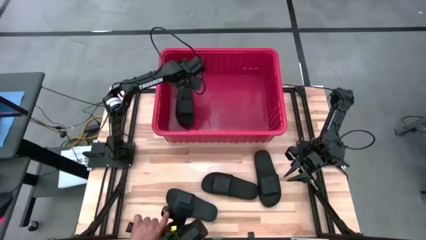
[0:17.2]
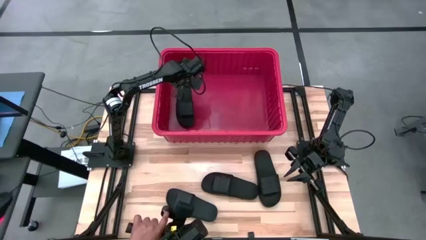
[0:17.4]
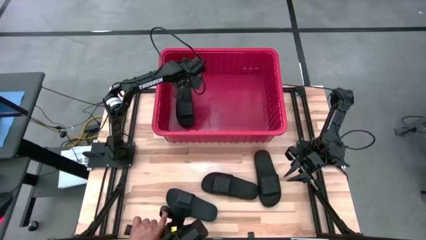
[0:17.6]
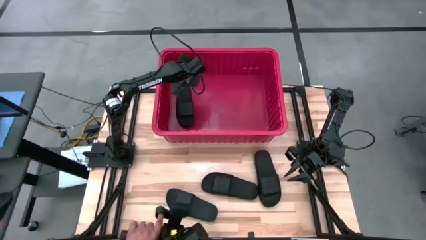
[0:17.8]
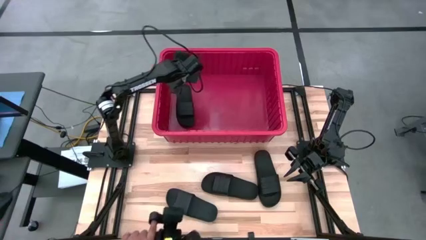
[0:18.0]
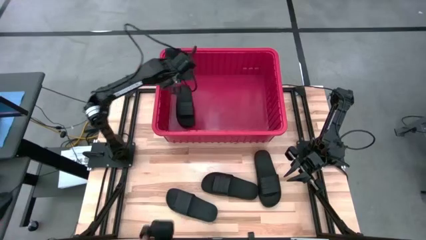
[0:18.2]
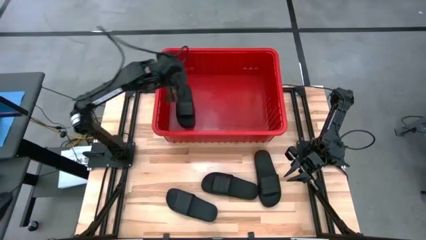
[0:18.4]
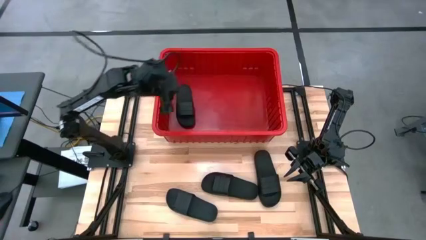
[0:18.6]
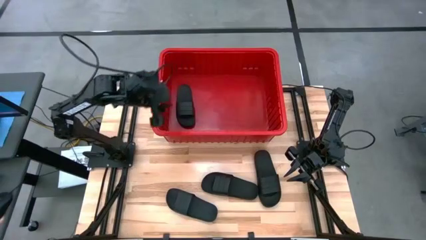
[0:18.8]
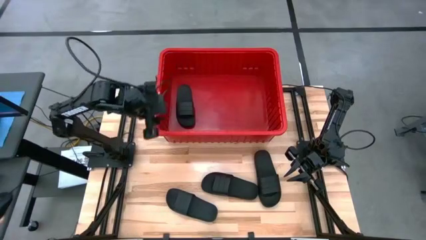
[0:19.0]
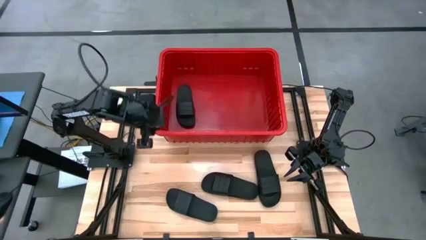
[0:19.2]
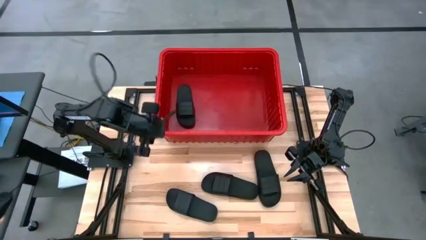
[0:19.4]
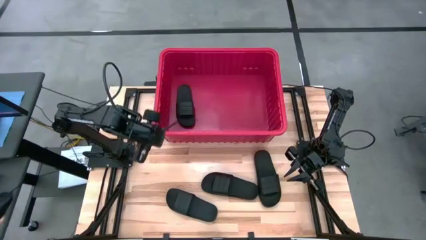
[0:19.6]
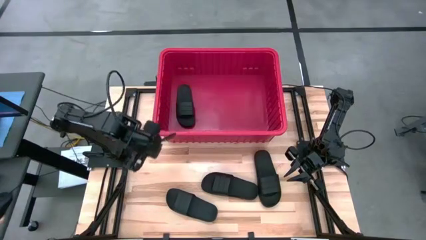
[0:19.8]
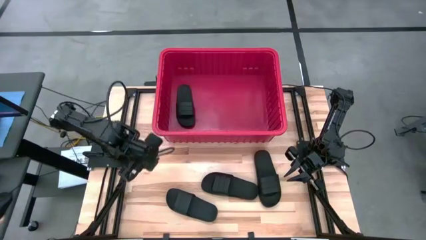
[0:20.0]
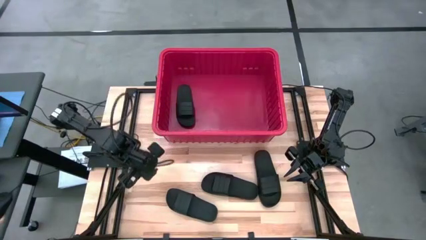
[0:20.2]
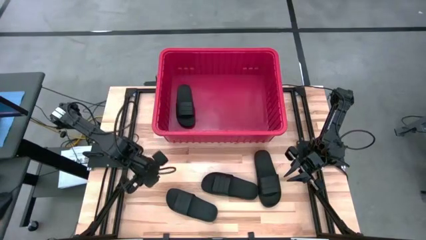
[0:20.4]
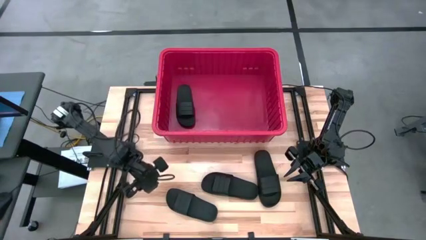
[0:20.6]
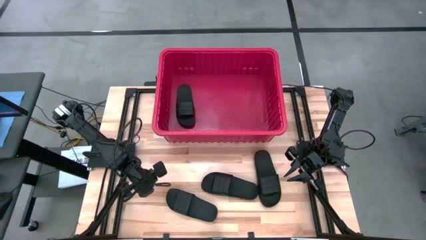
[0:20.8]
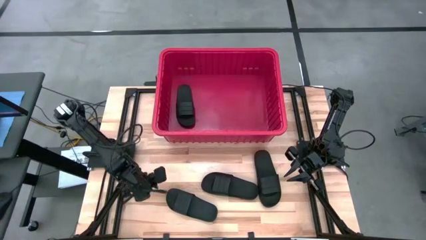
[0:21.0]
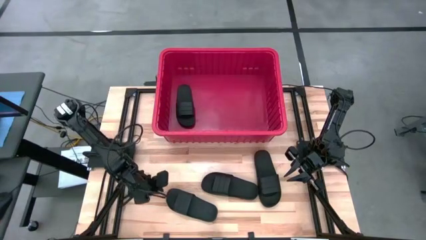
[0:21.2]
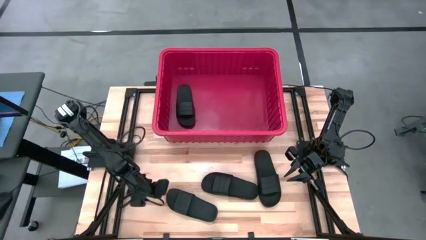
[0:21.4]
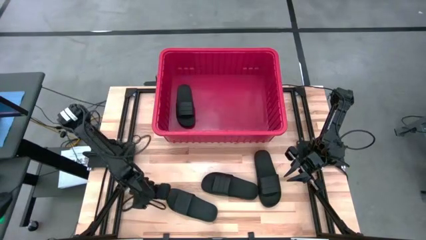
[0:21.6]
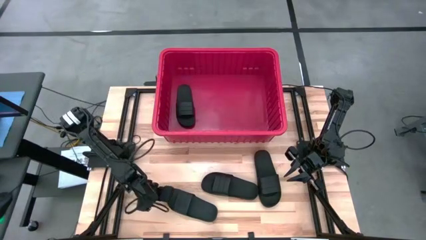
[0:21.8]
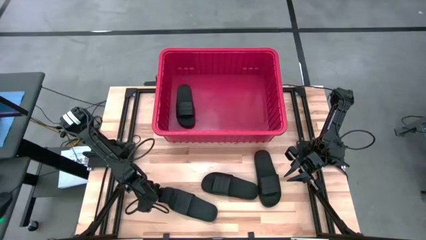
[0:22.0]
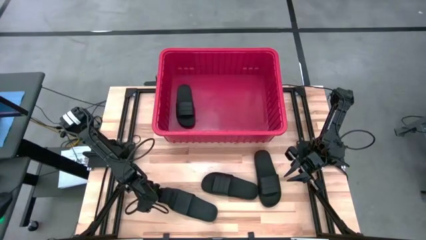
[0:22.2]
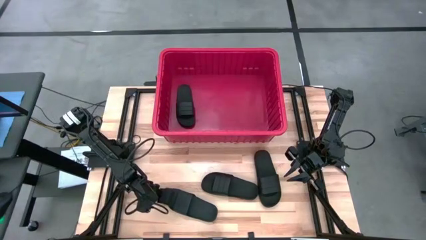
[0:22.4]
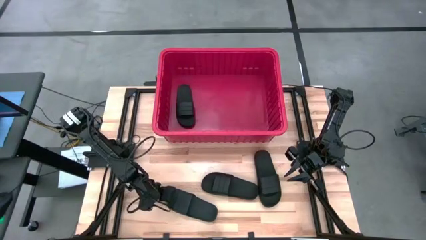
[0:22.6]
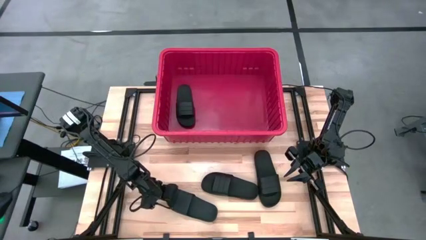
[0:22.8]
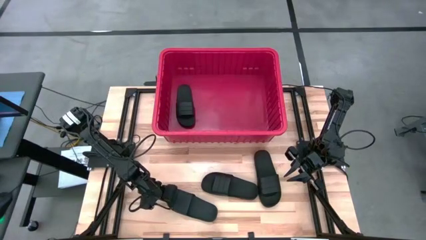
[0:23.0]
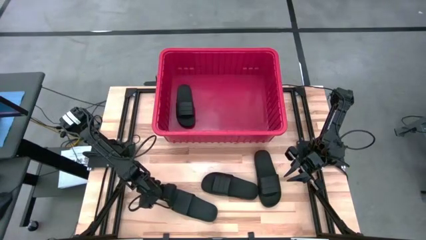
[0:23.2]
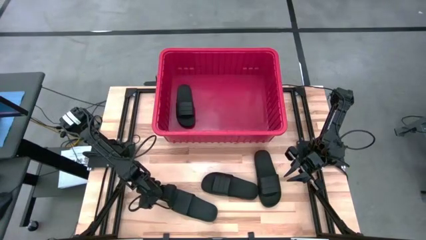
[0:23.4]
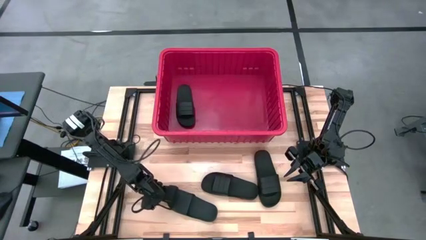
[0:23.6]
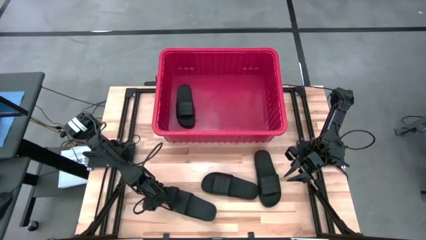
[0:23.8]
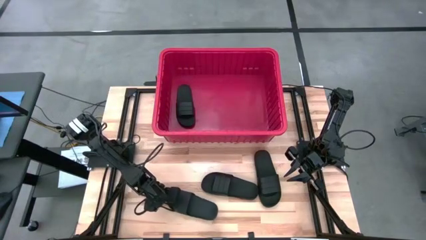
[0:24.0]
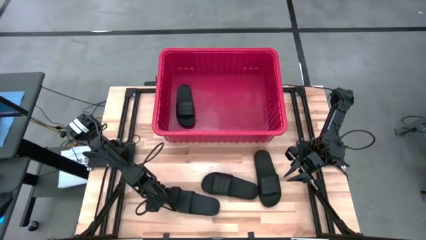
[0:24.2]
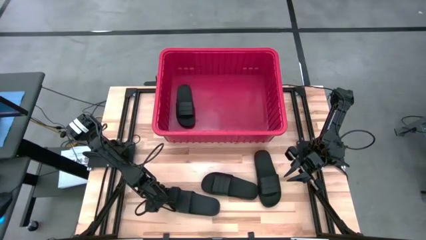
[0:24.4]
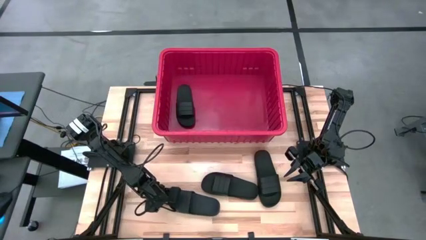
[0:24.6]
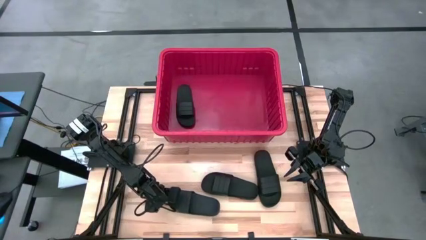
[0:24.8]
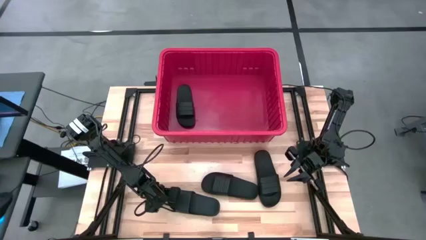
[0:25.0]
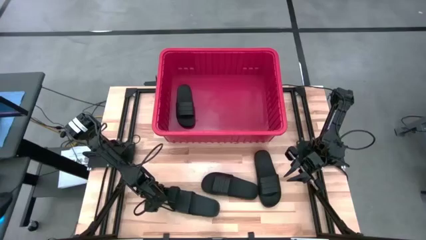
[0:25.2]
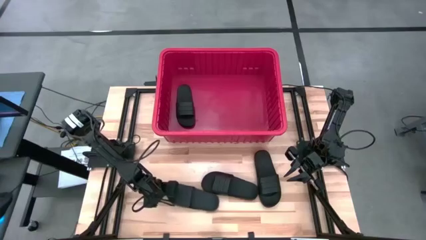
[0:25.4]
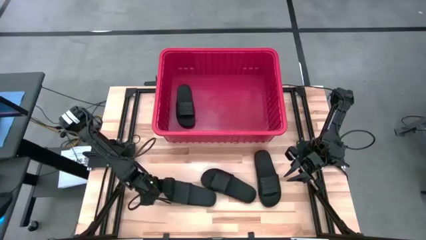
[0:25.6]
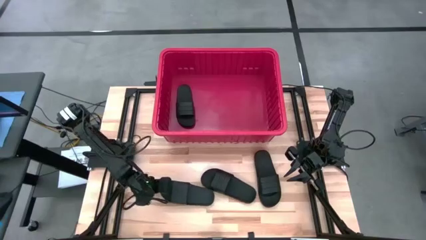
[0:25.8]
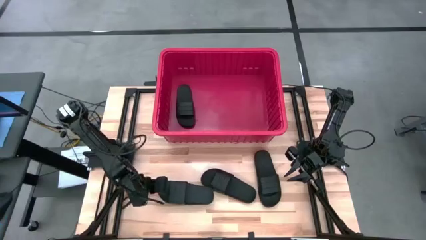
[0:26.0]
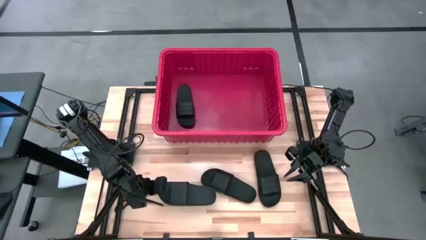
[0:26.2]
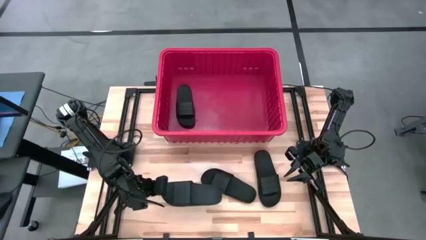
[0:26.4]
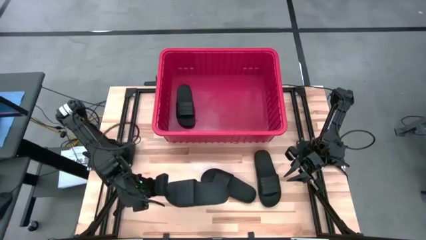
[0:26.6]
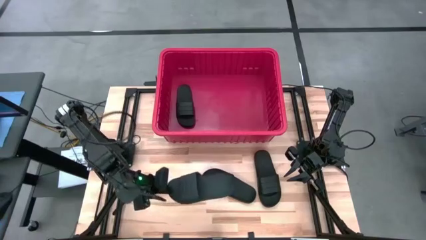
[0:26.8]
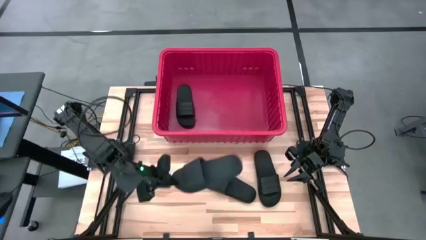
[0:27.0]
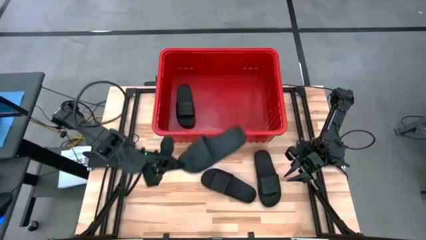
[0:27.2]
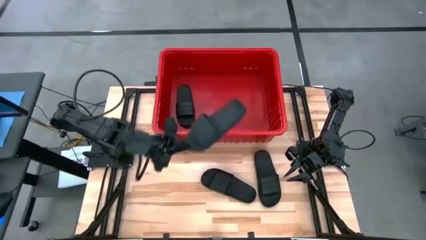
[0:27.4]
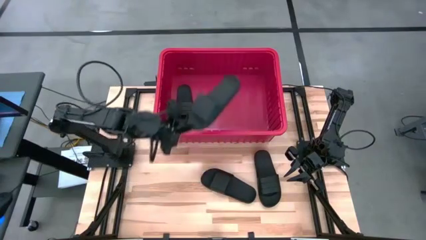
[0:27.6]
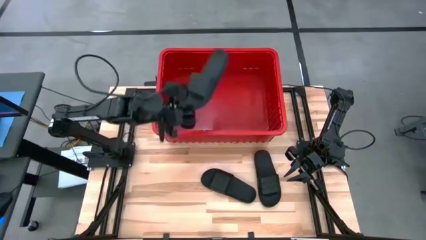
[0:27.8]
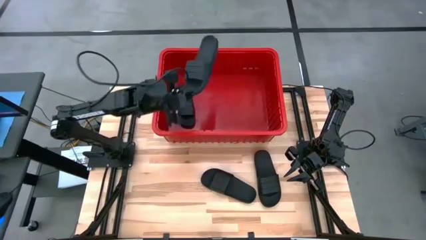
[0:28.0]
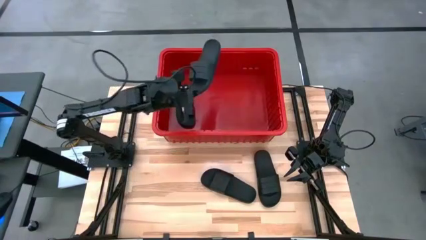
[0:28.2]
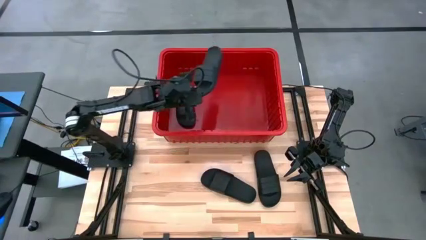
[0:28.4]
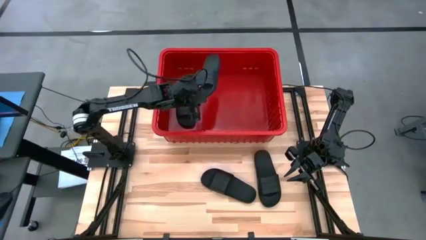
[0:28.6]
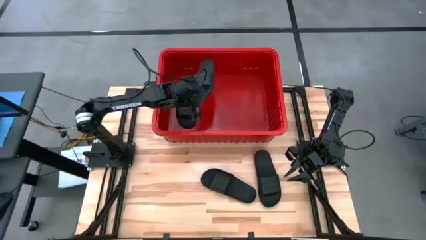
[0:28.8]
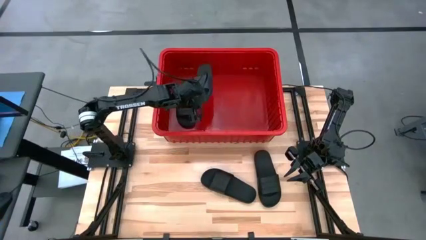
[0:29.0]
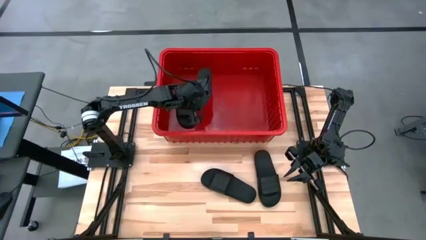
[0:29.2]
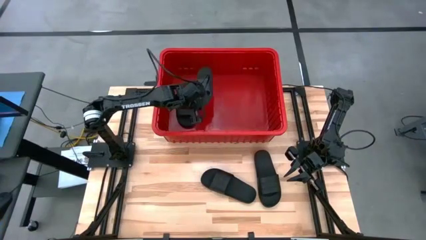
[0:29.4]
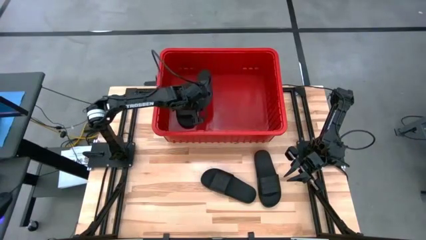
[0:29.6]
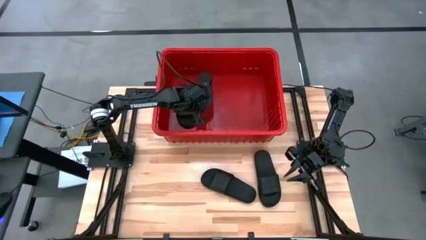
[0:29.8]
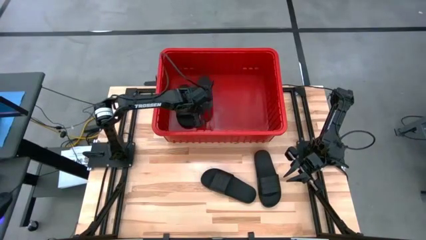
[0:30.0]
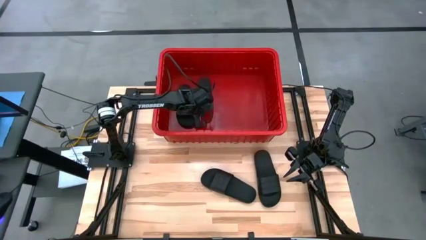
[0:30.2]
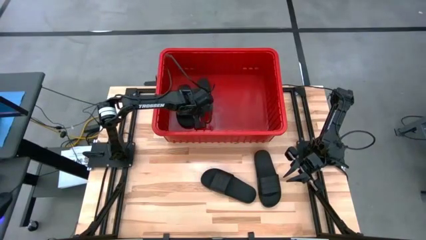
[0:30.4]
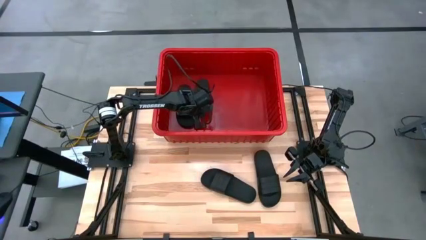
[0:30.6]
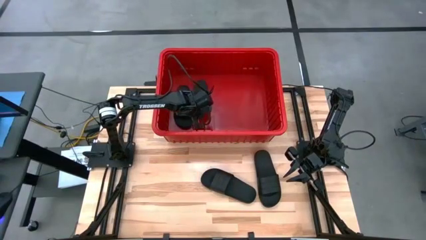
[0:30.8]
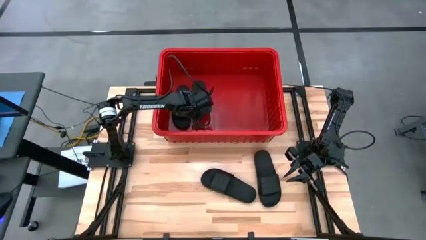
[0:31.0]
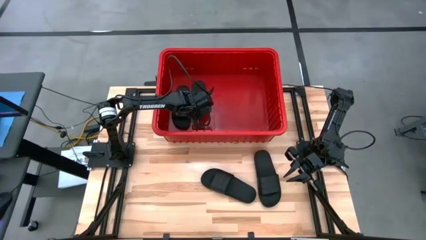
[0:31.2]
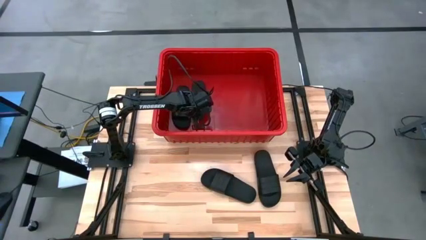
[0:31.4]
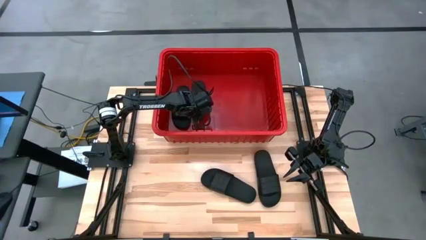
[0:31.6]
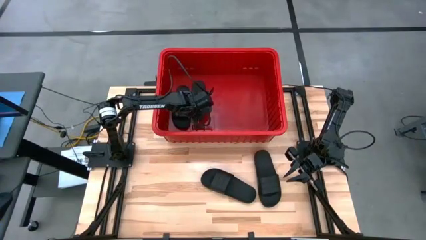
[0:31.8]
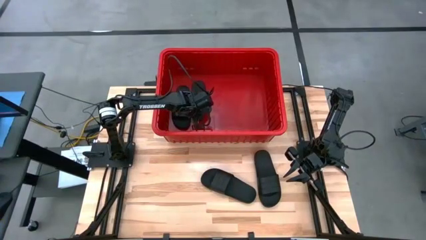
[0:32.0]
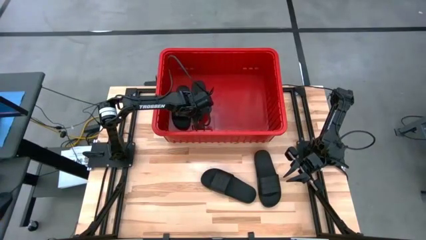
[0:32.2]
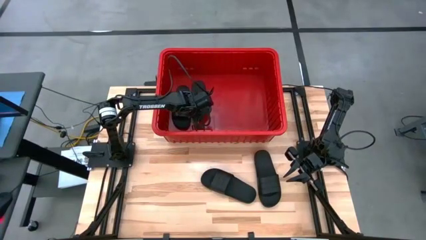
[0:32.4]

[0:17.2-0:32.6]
Task: Pick and place slides into bin
Put the black slide into the red bin

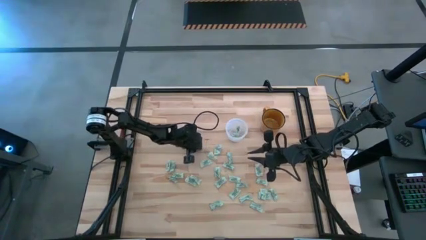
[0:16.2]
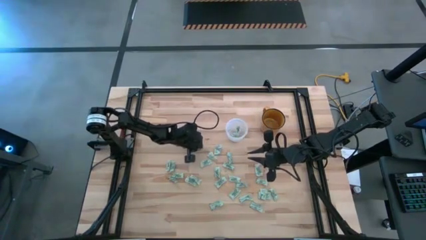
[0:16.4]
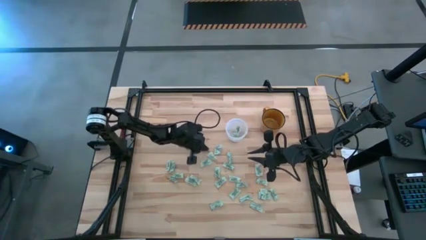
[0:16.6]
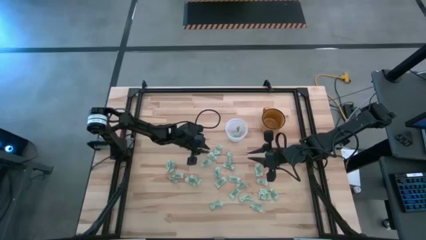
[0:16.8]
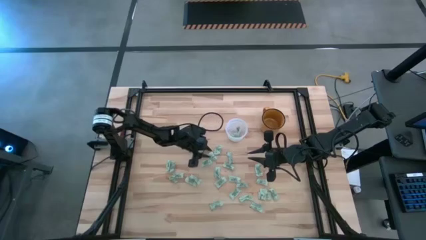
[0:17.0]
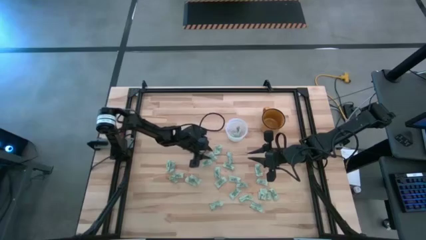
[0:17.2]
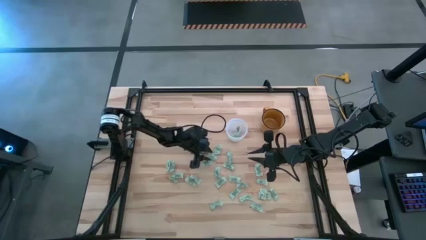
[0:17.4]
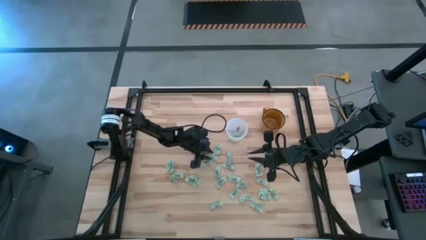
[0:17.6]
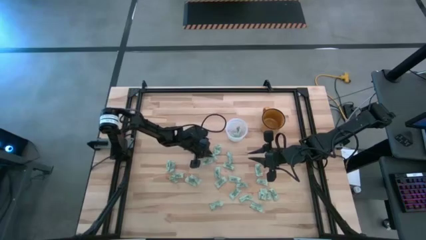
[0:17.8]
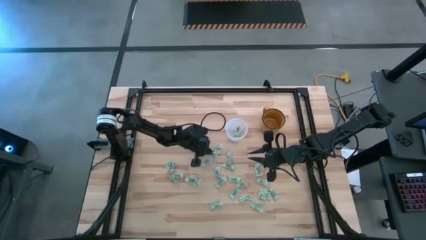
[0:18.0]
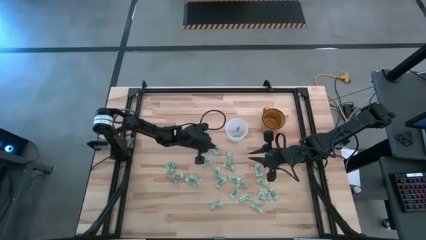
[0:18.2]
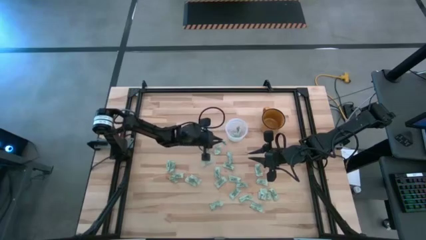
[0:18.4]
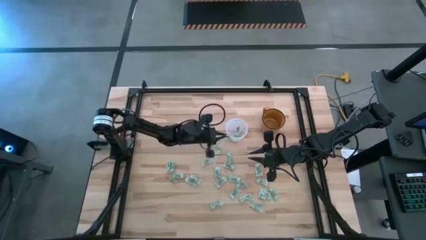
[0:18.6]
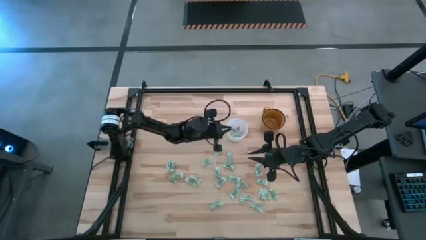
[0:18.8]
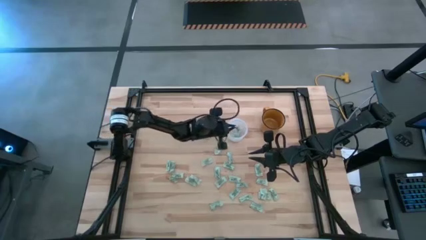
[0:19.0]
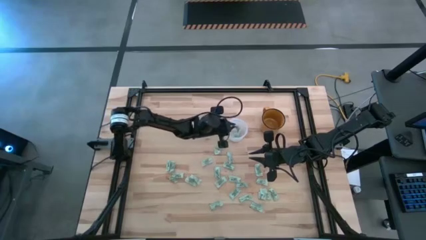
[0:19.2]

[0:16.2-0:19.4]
Task: Pick and place Stevia / Truvia into bins
Put the green stevia packet into the transparent bin
